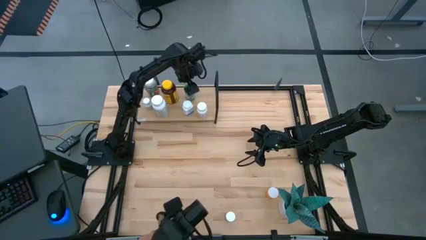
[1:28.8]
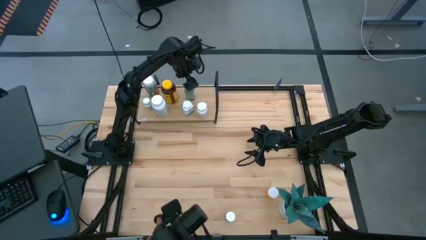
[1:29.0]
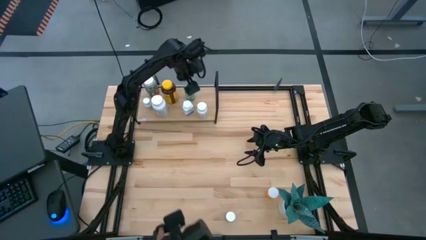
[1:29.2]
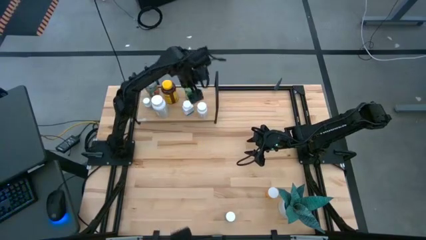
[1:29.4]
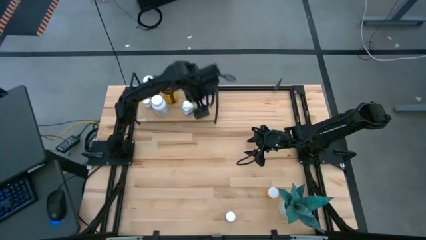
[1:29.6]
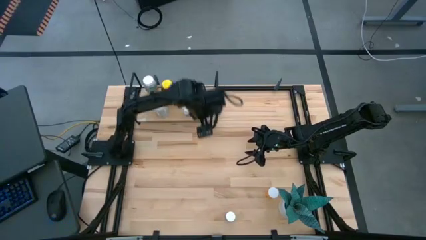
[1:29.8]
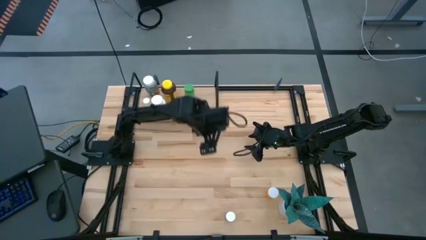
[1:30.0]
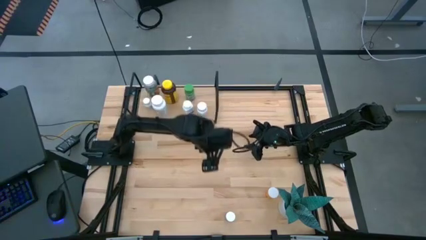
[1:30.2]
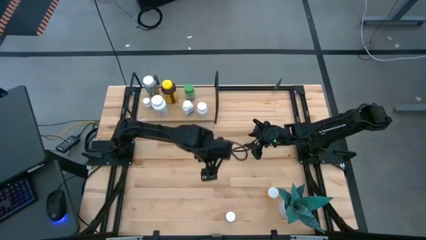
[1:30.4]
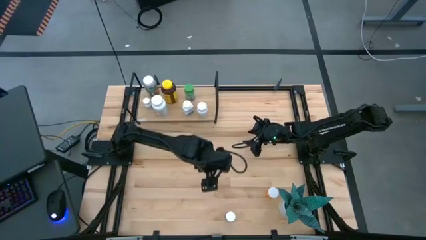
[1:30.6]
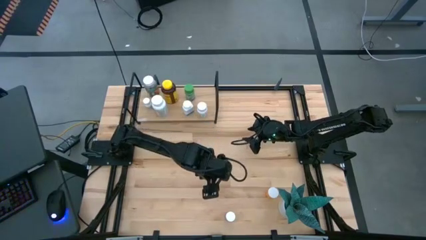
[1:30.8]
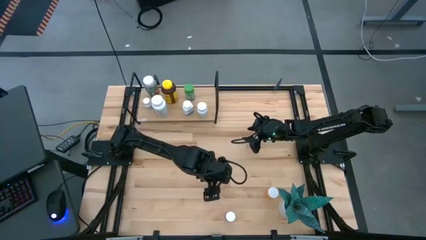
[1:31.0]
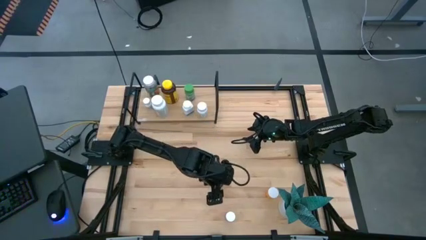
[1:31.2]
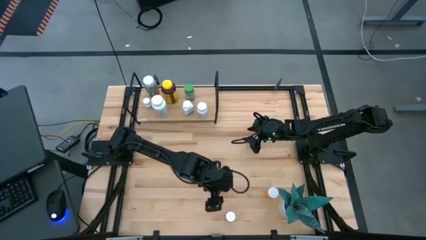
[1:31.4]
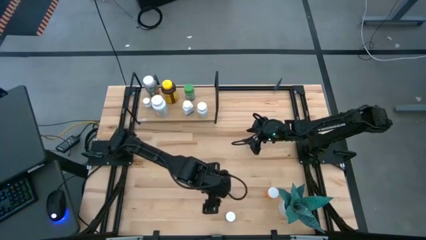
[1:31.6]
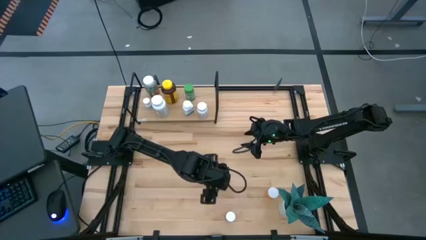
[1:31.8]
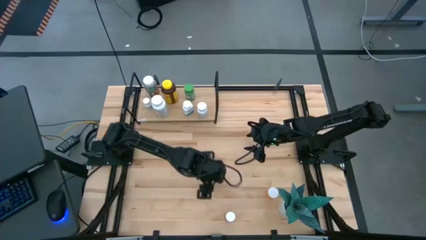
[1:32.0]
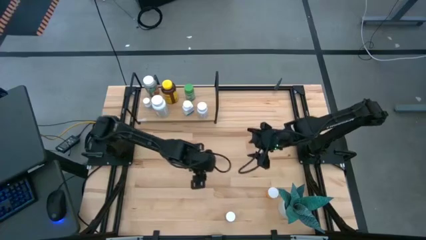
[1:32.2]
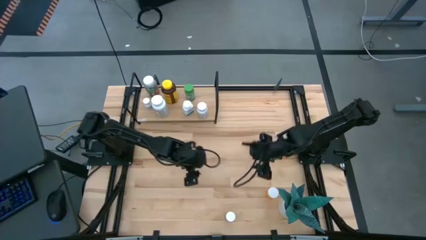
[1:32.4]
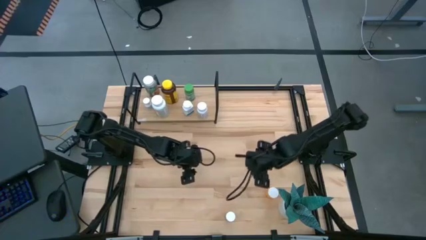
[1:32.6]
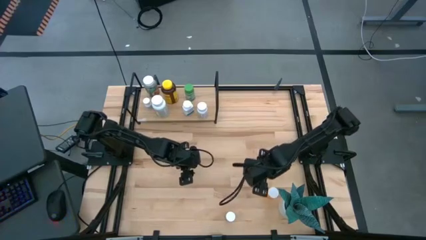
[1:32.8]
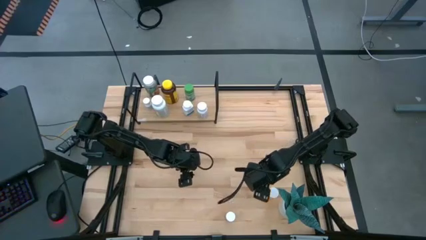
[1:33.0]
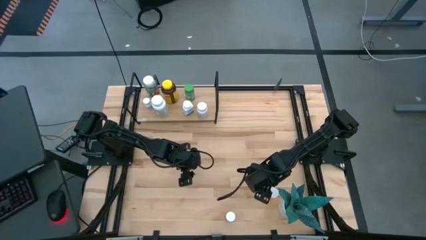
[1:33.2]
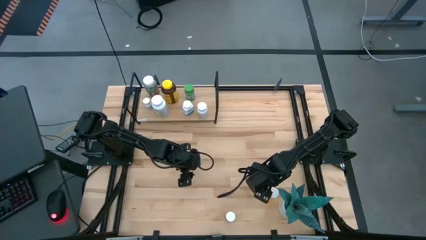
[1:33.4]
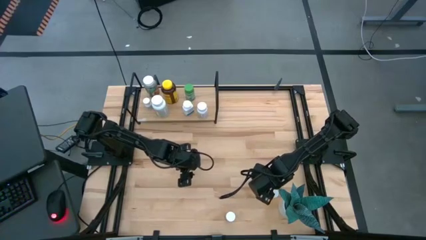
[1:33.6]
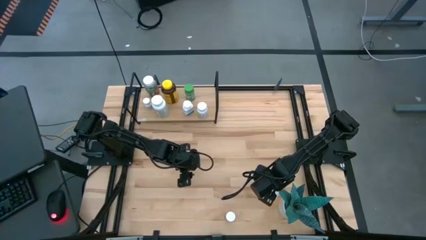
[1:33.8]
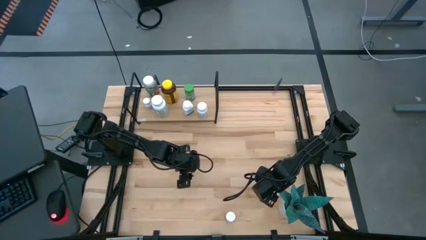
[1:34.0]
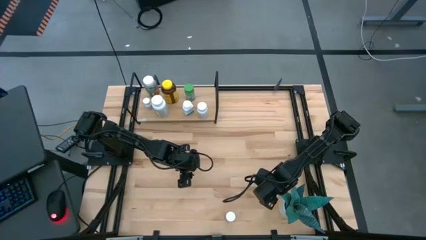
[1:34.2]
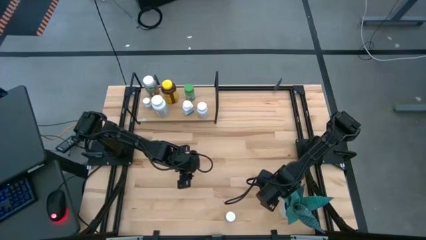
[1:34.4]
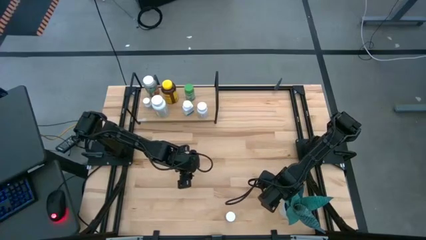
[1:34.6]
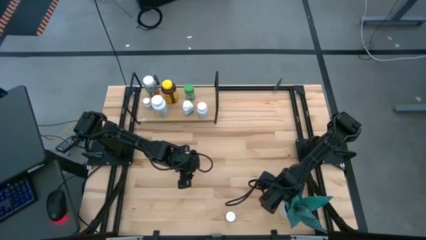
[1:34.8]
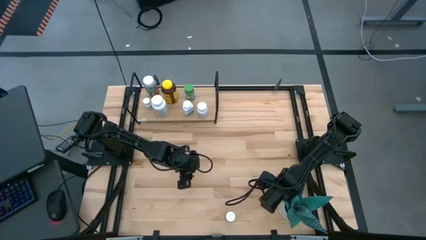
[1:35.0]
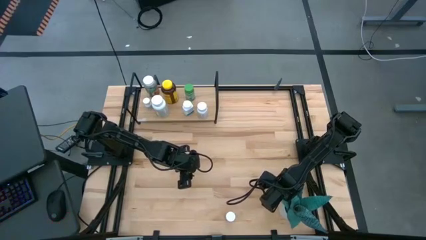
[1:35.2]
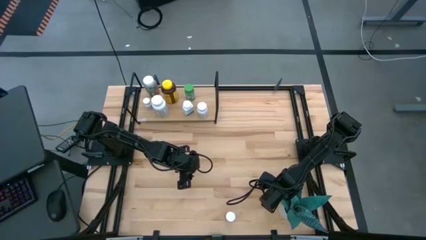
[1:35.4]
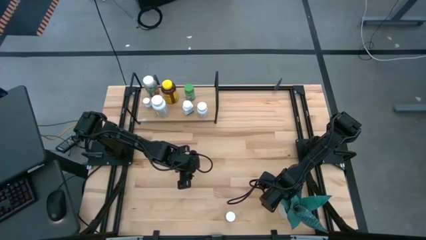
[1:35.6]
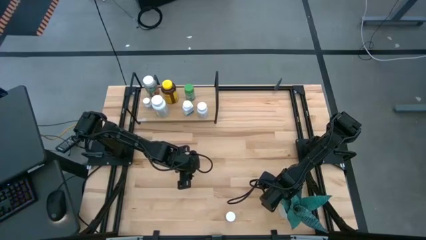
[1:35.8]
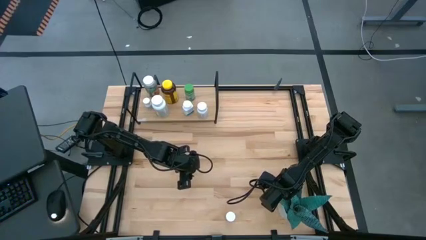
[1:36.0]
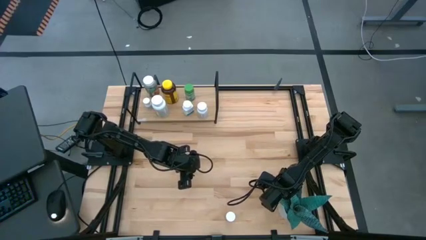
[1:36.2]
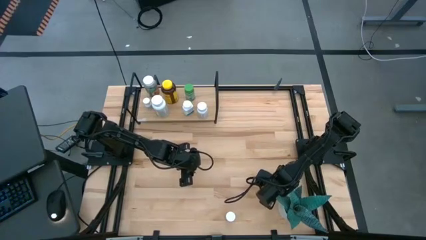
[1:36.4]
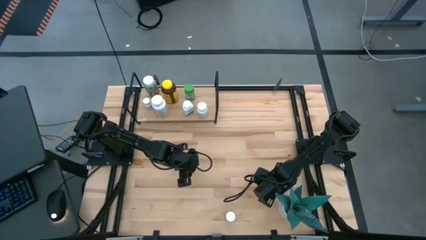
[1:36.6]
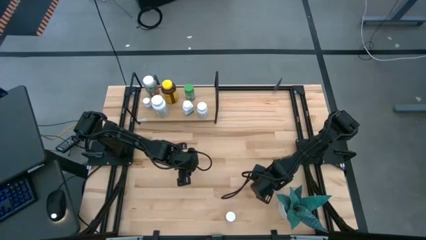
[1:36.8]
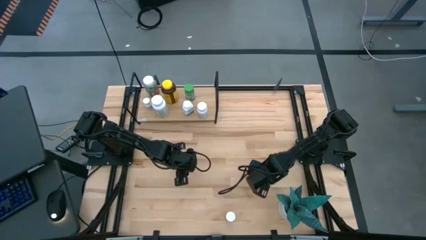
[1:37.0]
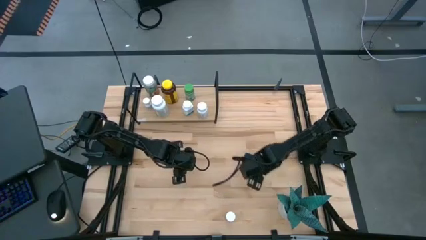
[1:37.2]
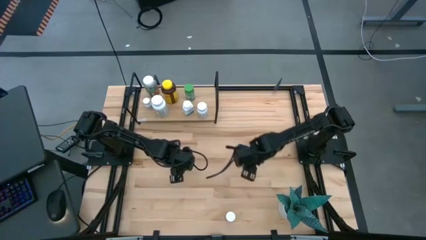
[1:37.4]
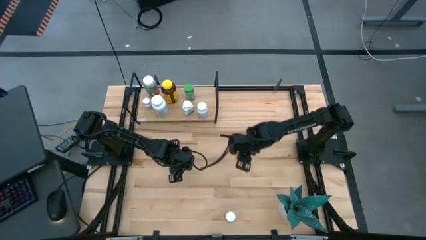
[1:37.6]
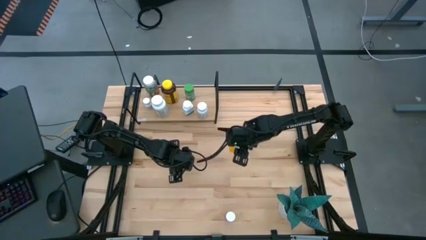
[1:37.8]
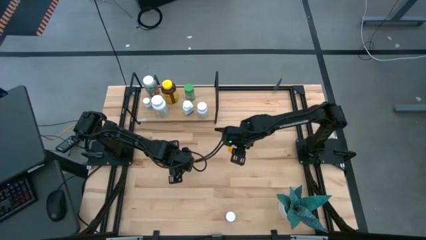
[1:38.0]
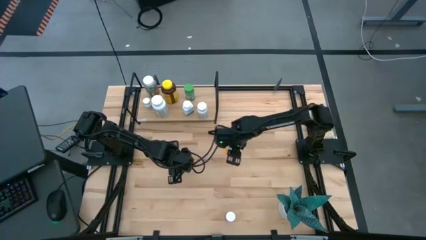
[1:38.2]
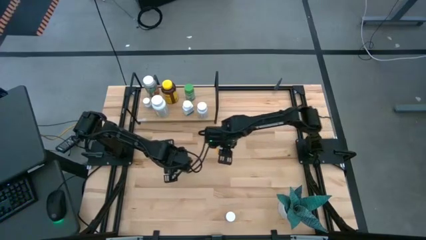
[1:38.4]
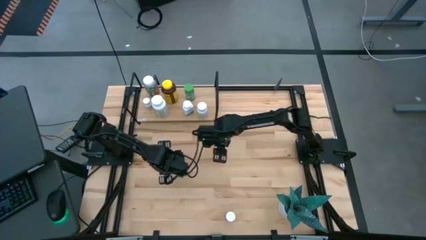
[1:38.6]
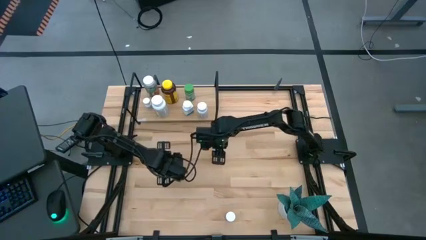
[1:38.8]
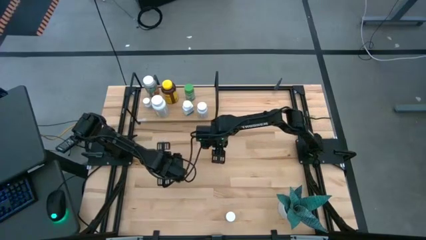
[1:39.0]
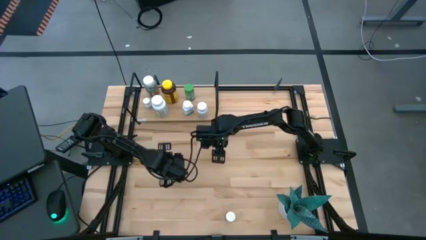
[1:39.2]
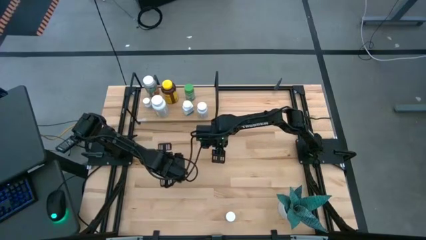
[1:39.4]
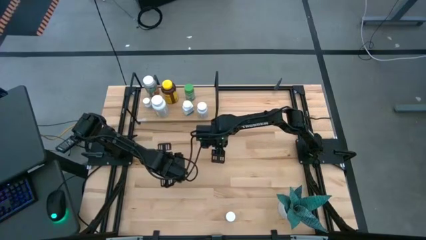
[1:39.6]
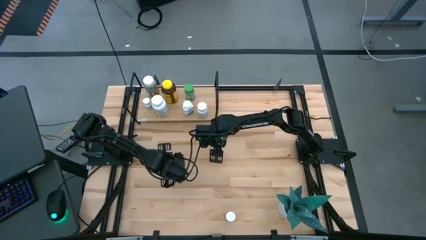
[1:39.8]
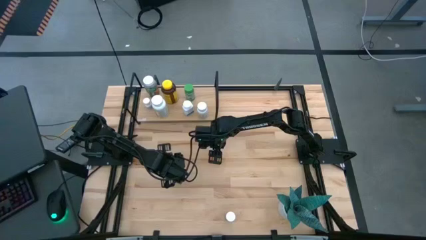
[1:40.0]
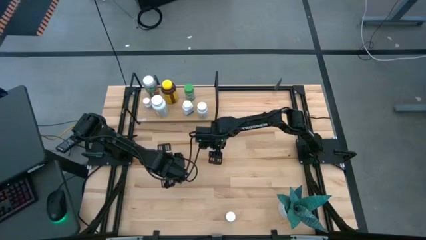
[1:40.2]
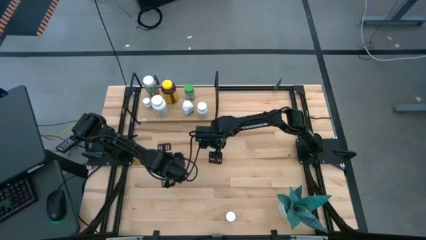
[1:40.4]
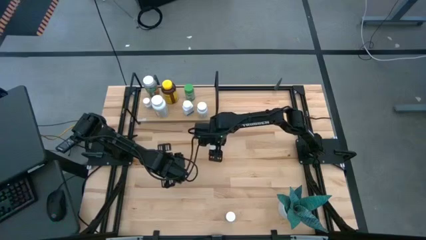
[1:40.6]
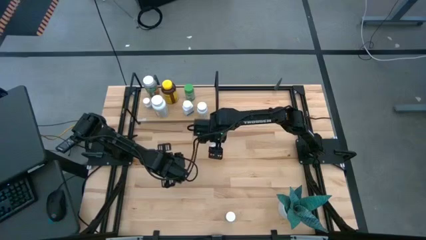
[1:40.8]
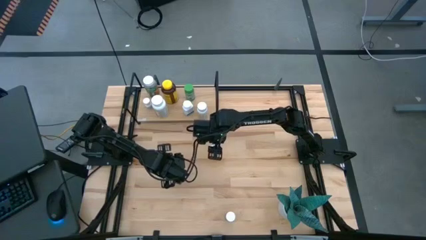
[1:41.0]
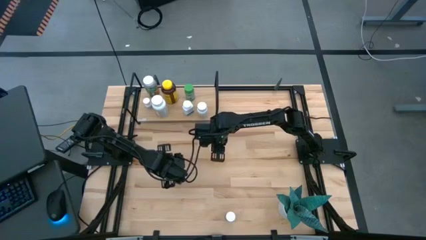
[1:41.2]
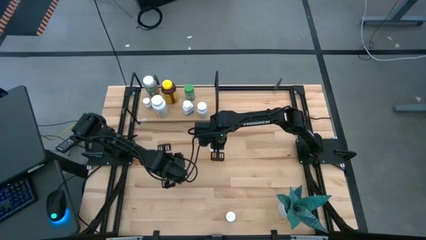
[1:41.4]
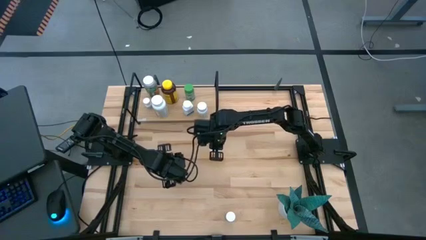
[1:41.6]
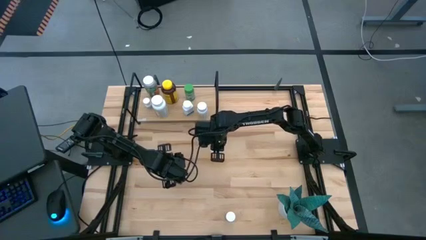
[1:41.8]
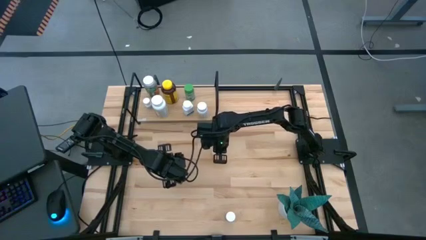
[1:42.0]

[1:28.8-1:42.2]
Task: Pick and place medicine bottles onto shelf by color
Put the orange pill bottle on the shelf

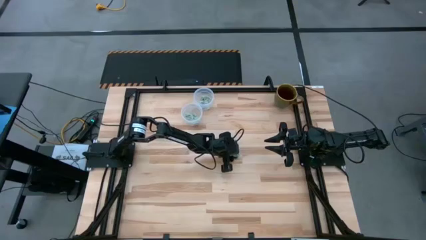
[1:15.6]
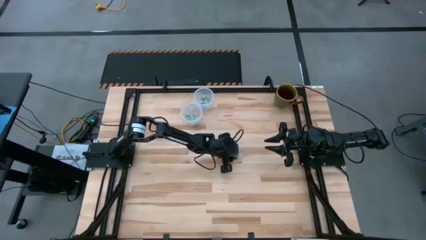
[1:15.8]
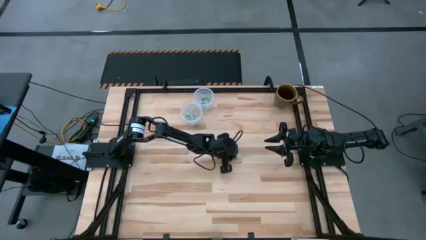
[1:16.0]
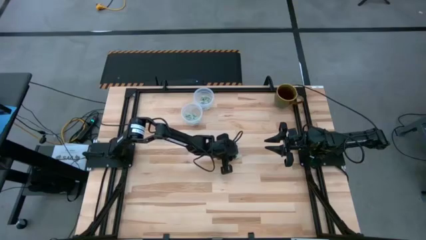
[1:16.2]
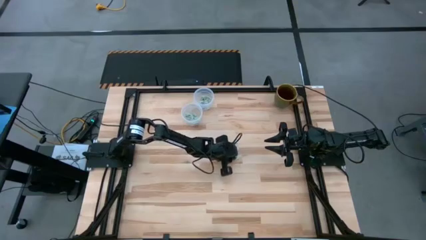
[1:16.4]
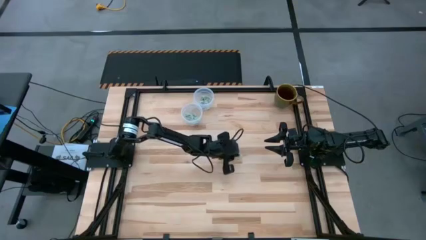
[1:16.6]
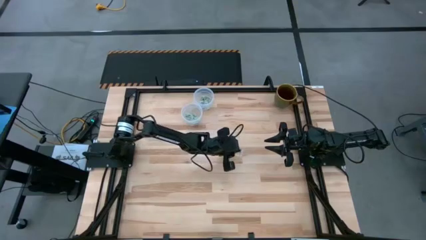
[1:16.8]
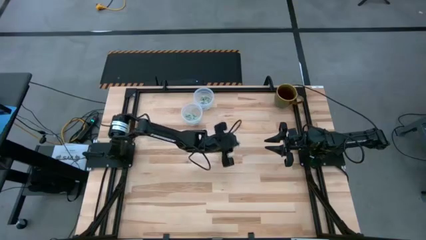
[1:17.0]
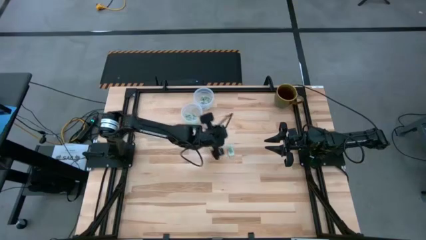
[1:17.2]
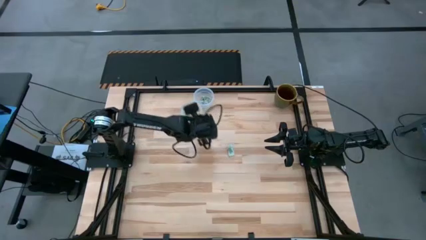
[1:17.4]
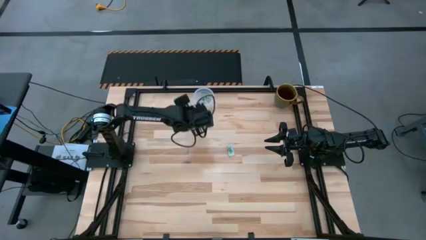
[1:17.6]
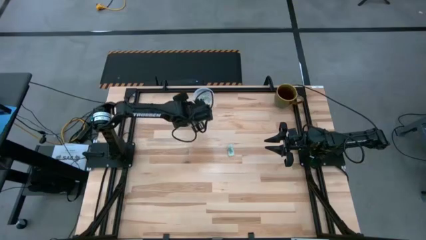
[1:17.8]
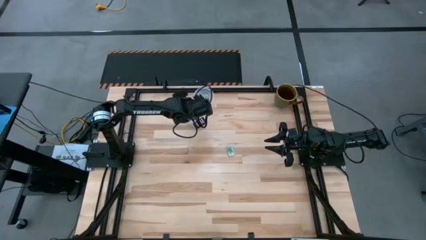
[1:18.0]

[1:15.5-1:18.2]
Task: Pick and place items into bin
Put the right stevia packet into the bottom bin
